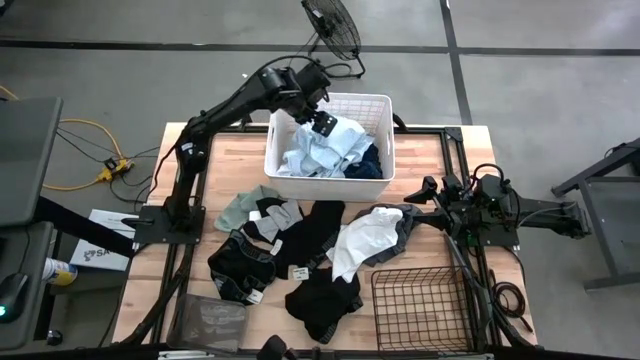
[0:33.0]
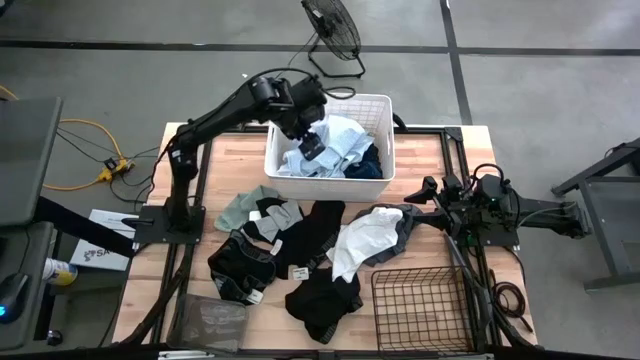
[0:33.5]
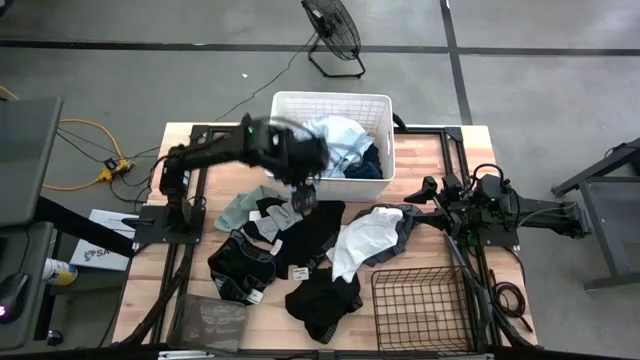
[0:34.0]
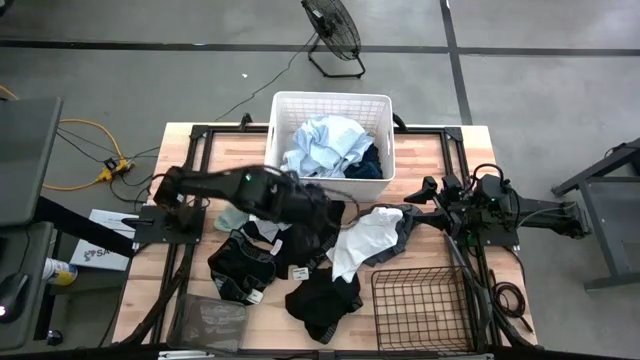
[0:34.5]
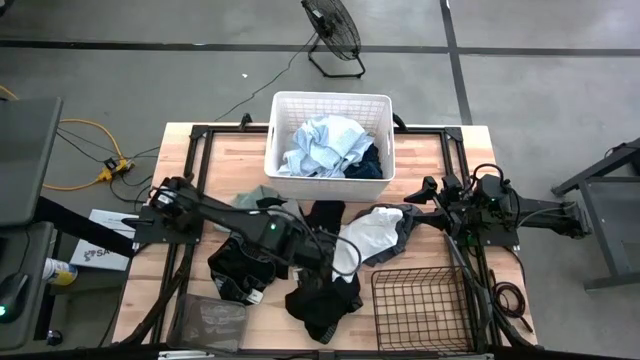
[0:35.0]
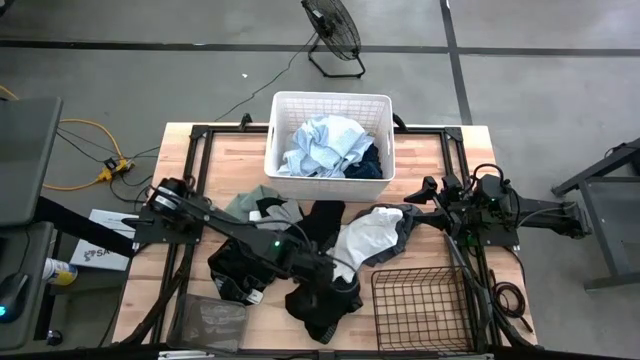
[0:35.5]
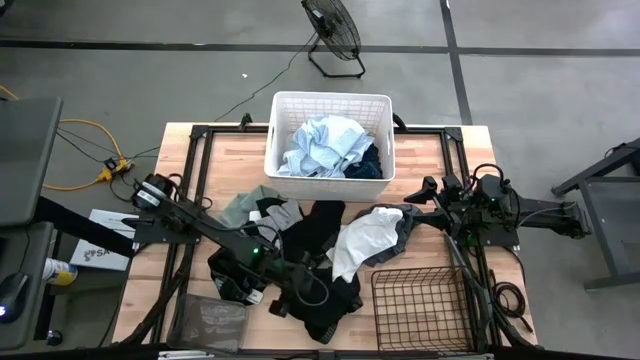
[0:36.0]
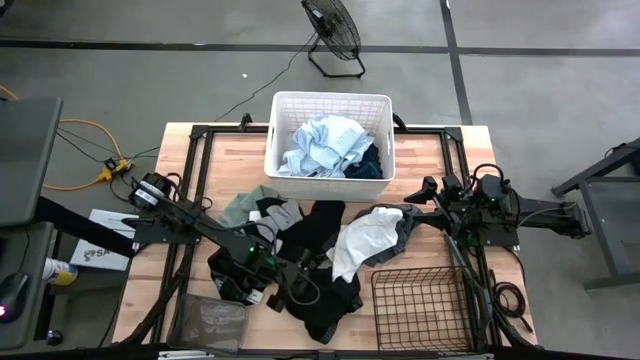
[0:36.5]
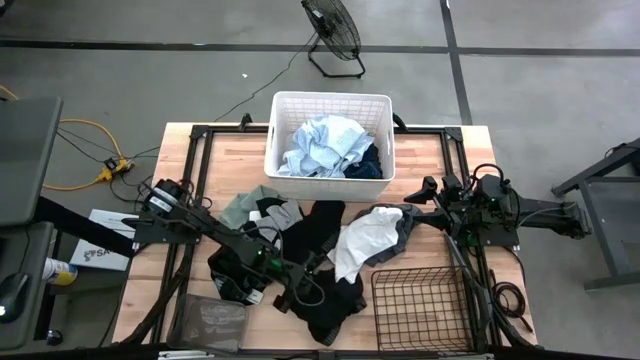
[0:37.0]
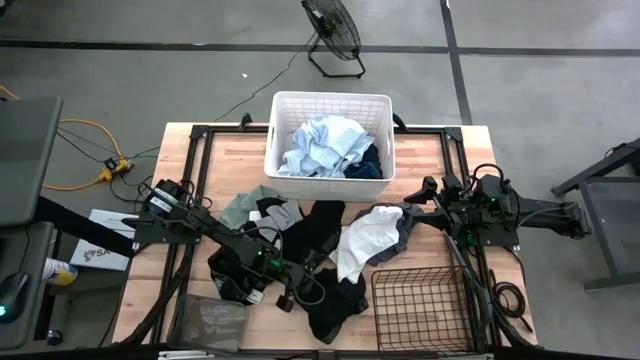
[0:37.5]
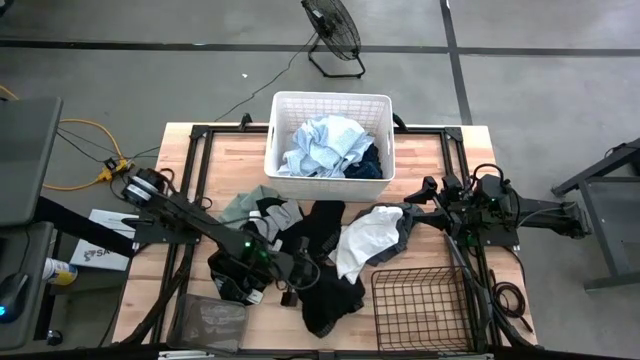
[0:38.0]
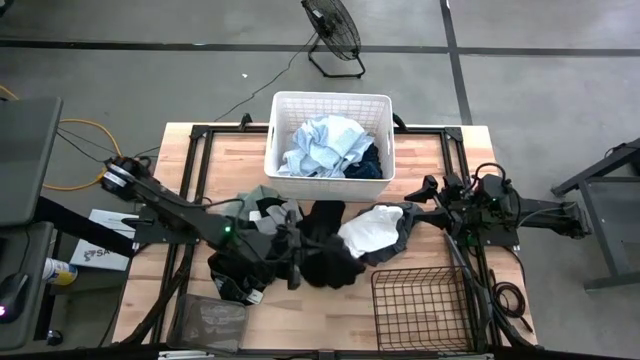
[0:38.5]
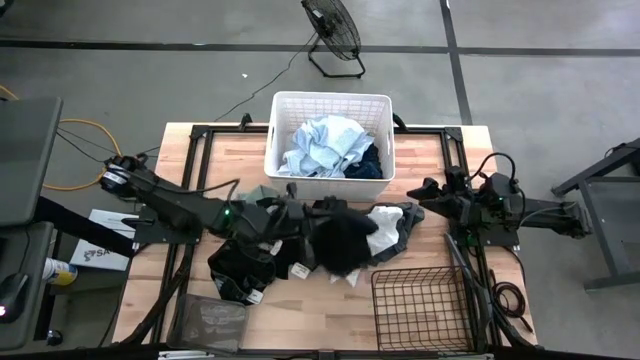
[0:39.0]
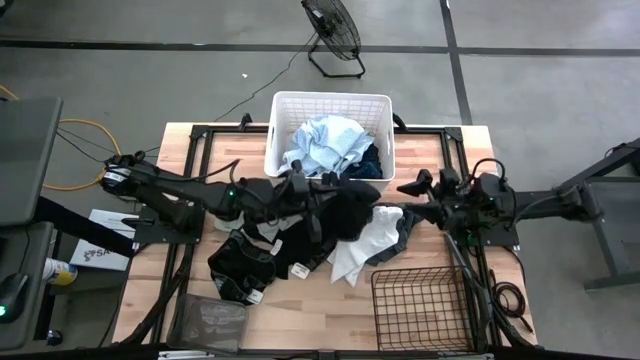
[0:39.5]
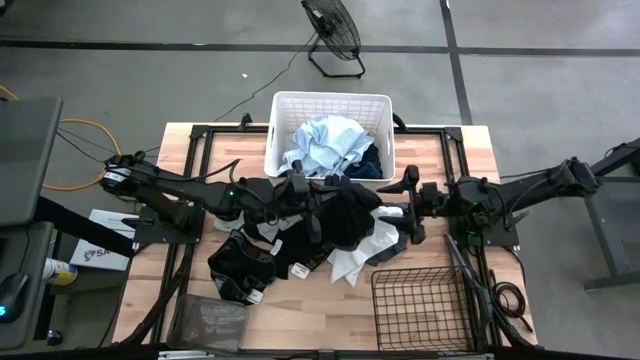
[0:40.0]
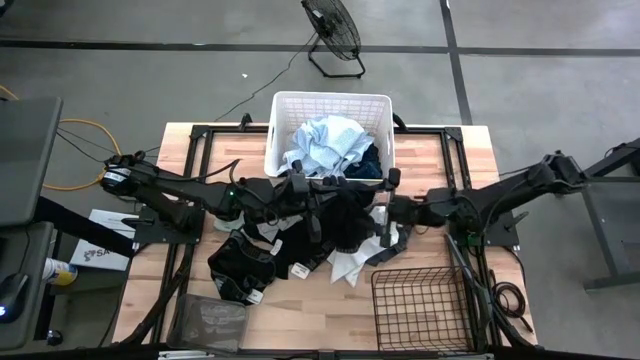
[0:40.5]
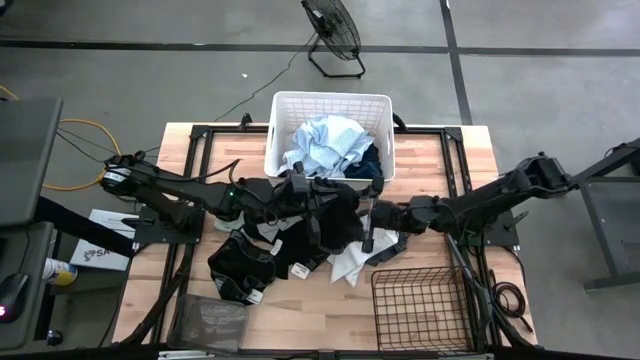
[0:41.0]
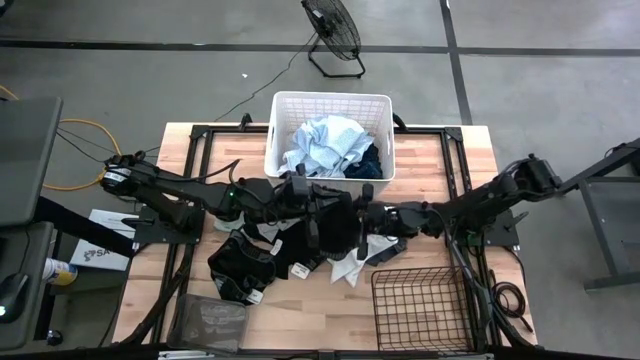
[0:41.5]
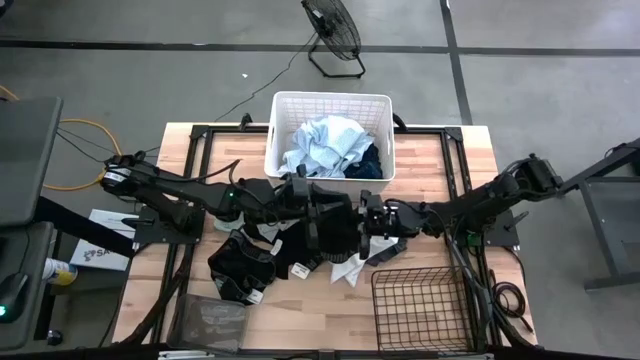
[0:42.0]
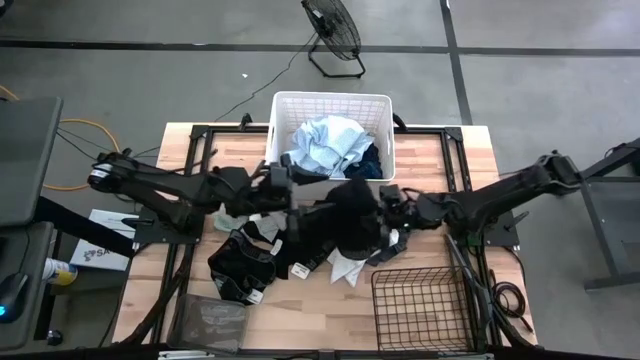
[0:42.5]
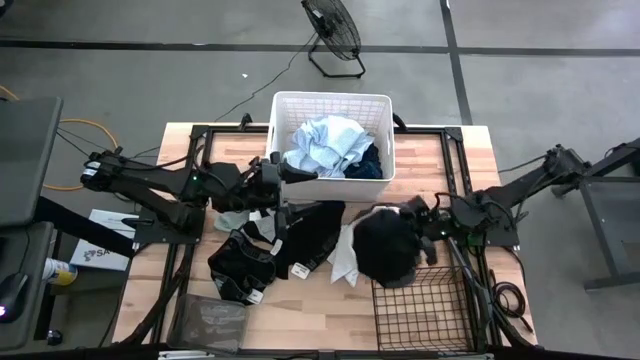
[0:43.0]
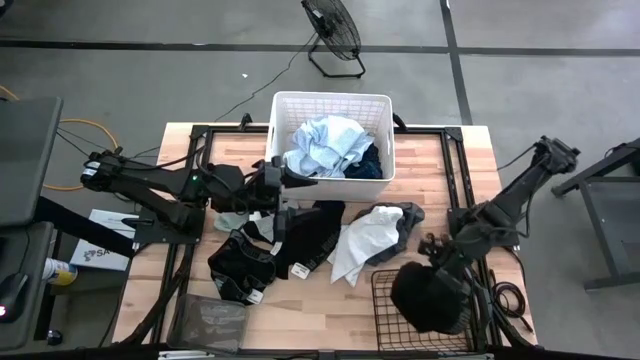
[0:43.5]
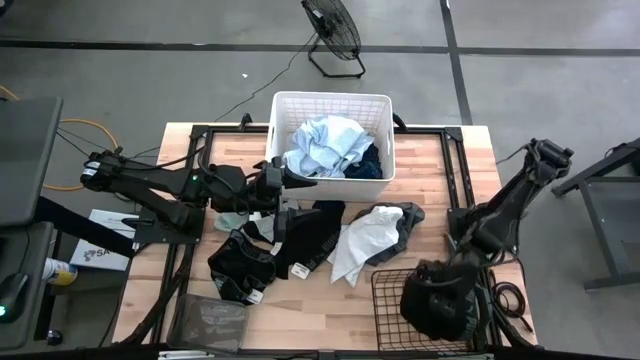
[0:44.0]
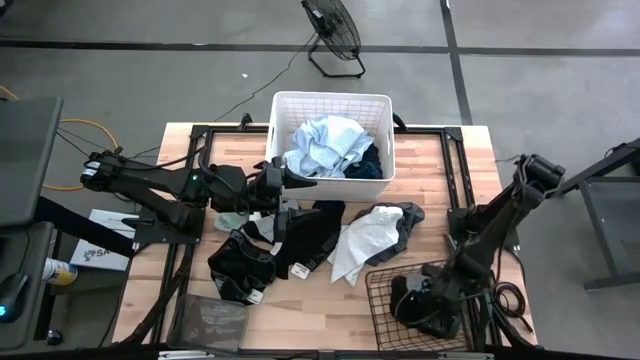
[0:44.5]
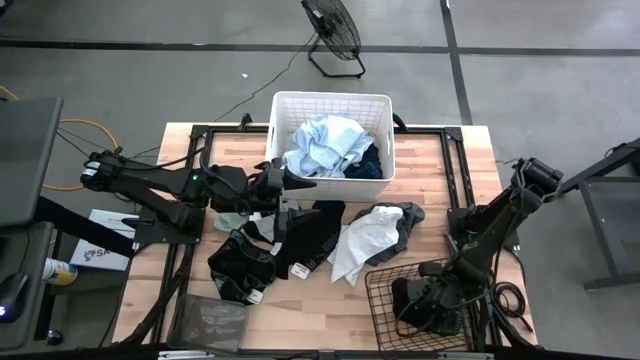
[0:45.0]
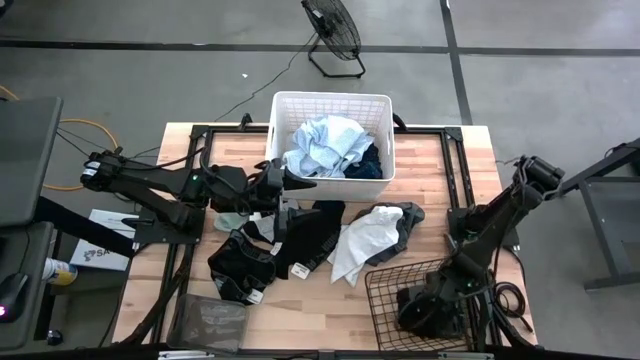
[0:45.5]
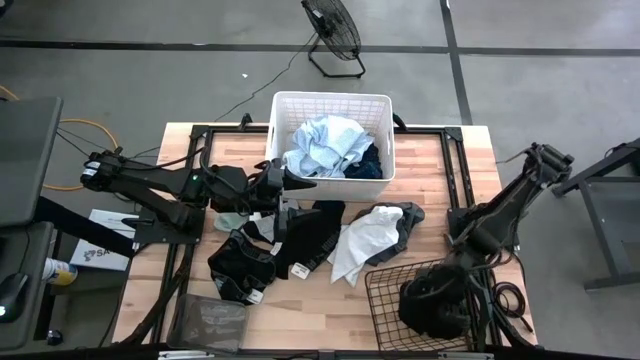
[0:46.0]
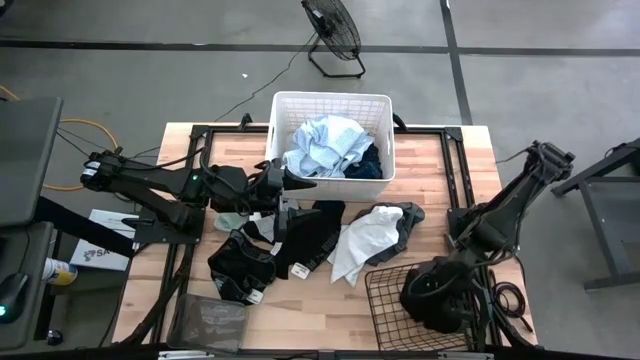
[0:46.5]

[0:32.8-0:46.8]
Task: Pick & Place Cloths
Put the bottom black boxer into the wire basket

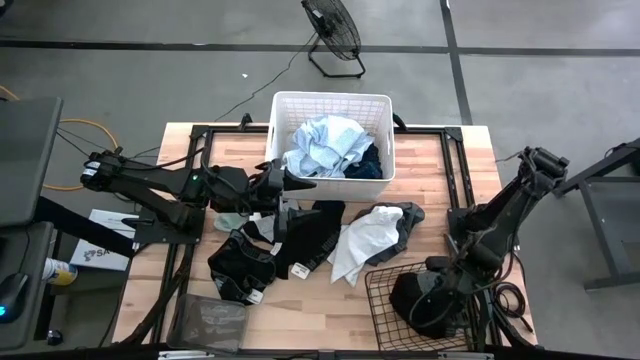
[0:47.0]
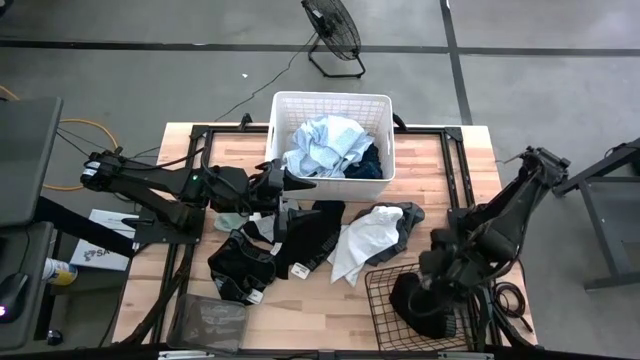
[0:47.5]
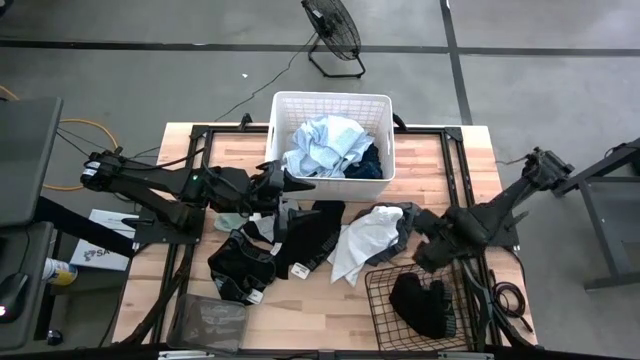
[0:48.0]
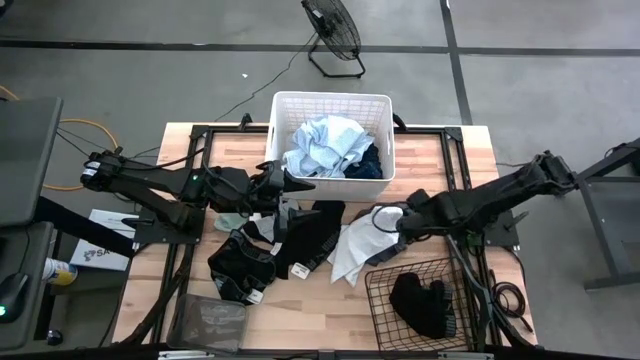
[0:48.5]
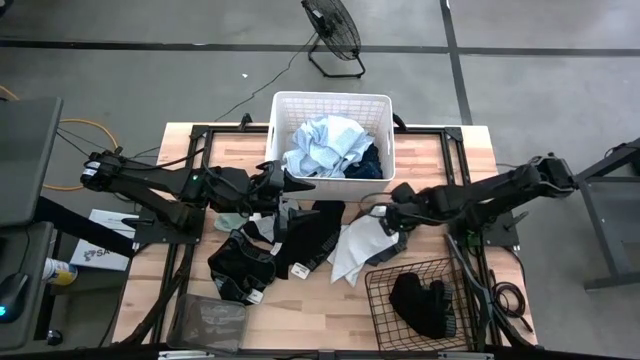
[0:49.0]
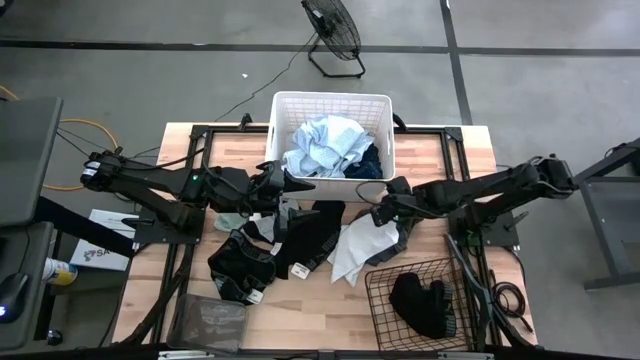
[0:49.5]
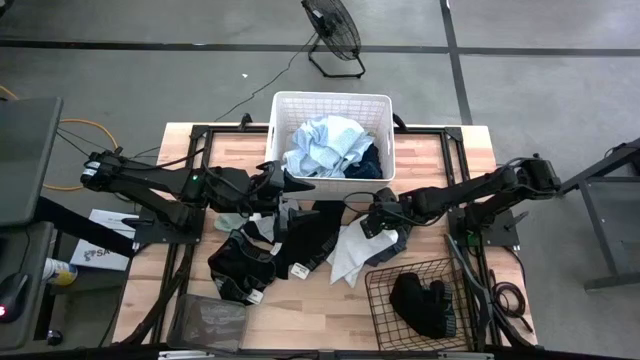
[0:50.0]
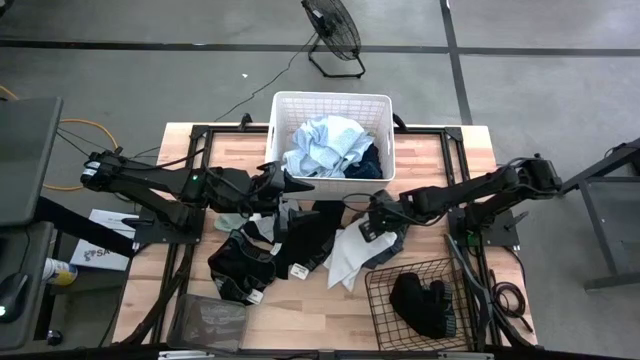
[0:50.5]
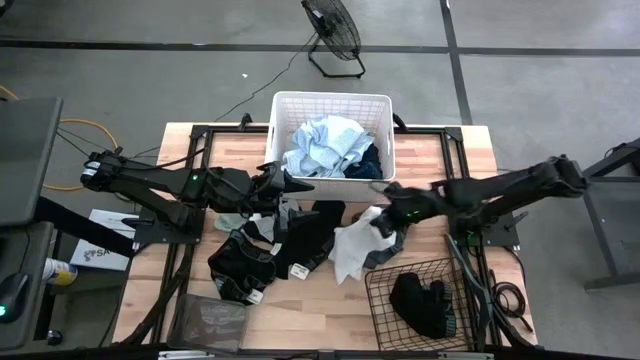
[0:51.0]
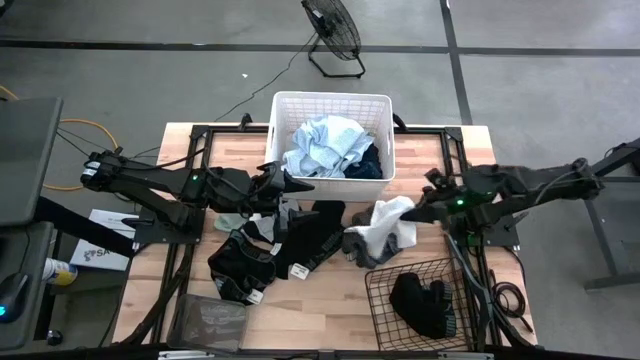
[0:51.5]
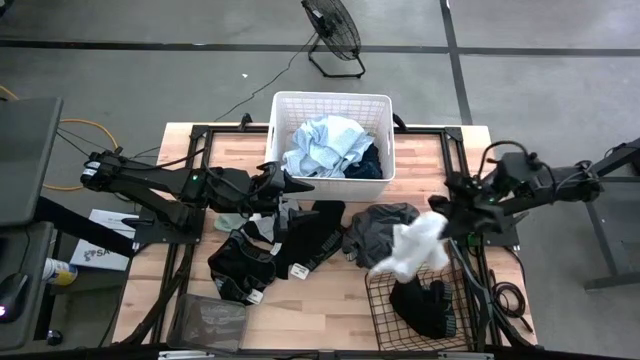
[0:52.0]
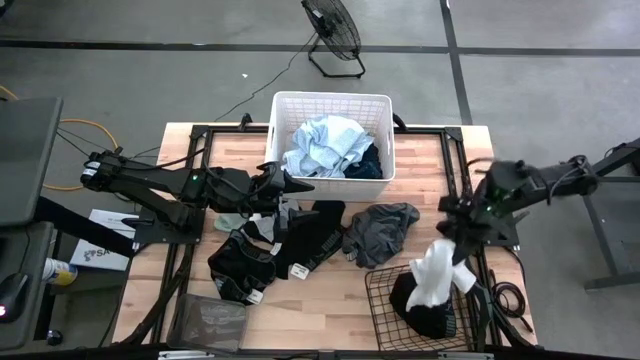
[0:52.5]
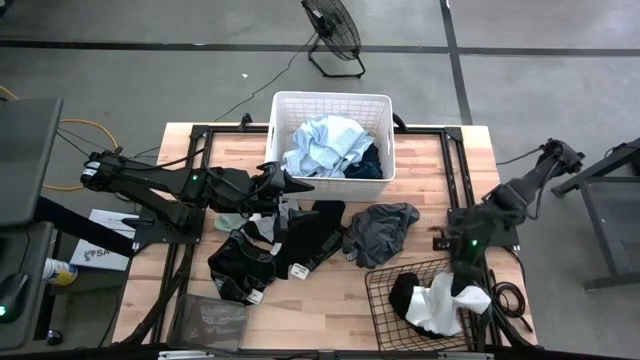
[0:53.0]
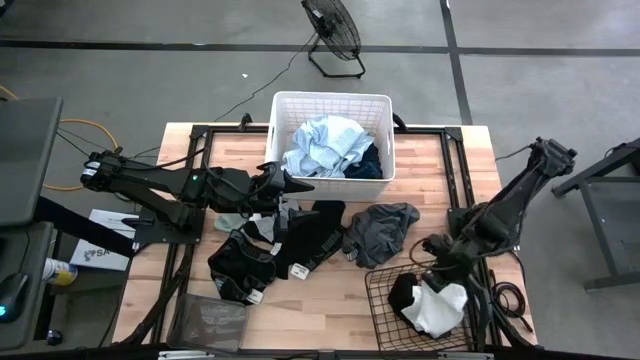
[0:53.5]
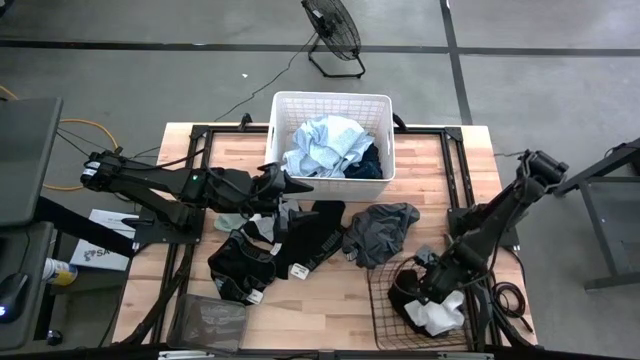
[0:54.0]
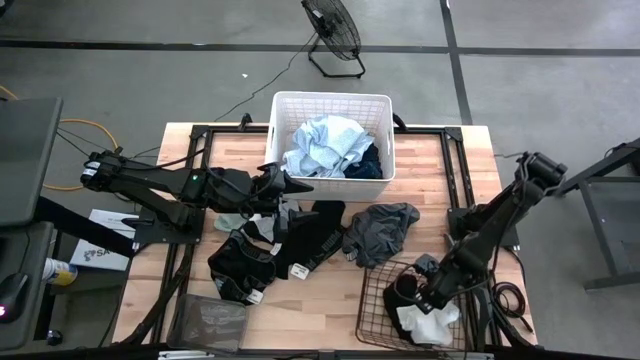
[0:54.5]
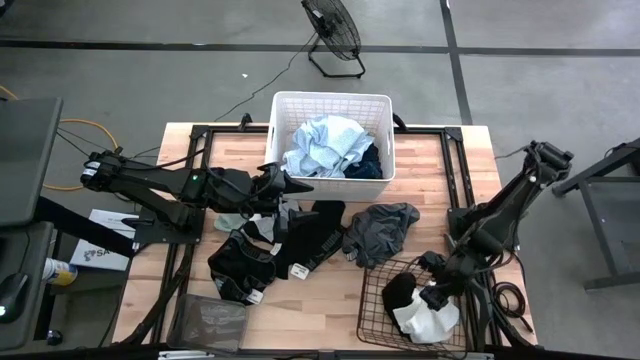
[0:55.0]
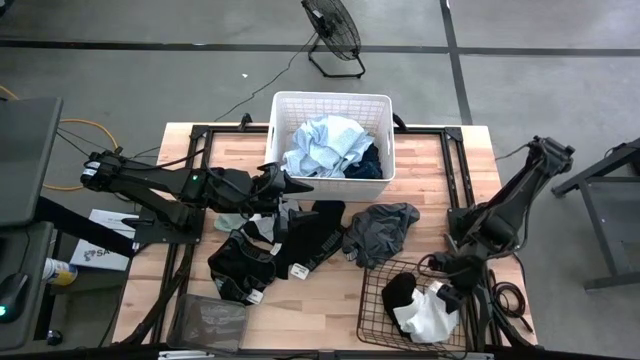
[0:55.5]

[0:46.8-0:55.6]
Put the white boxer into the wire basket
